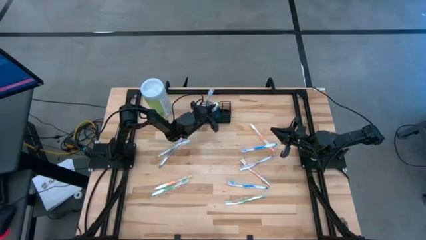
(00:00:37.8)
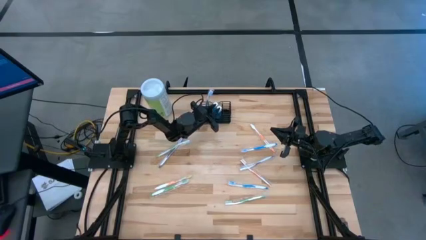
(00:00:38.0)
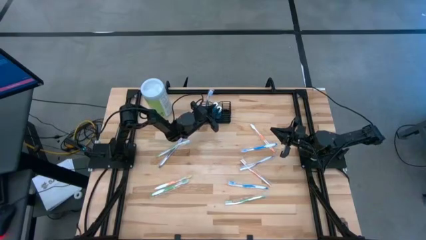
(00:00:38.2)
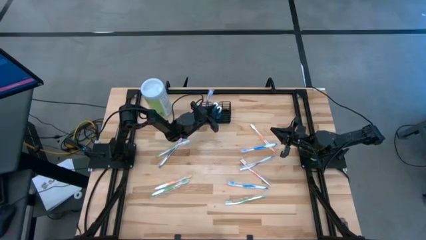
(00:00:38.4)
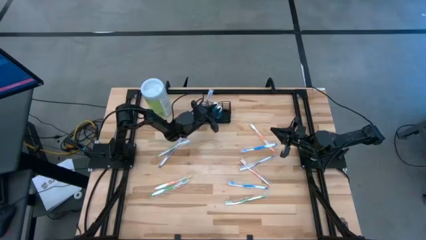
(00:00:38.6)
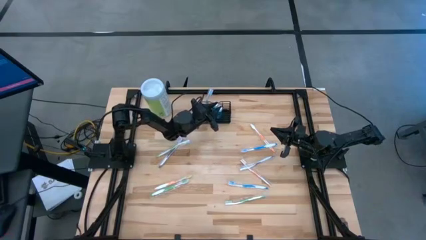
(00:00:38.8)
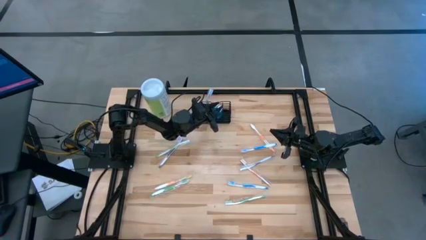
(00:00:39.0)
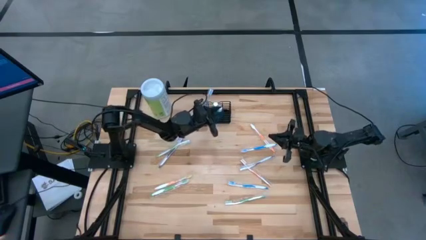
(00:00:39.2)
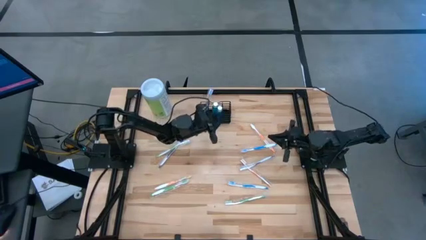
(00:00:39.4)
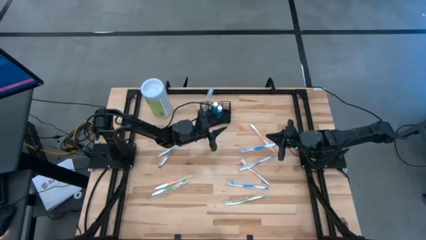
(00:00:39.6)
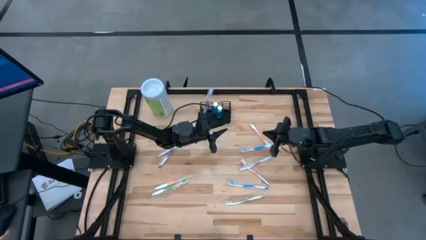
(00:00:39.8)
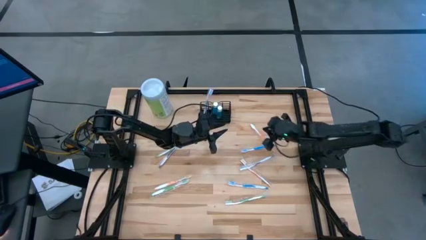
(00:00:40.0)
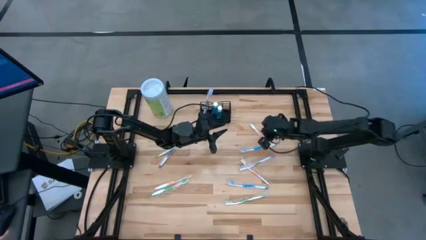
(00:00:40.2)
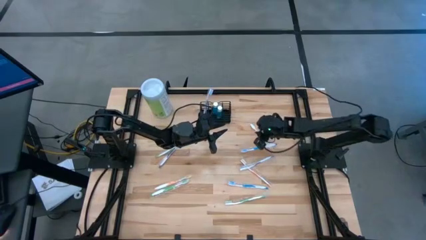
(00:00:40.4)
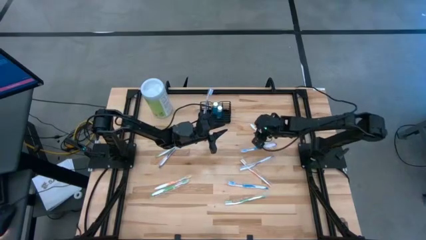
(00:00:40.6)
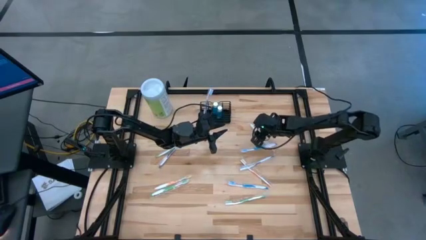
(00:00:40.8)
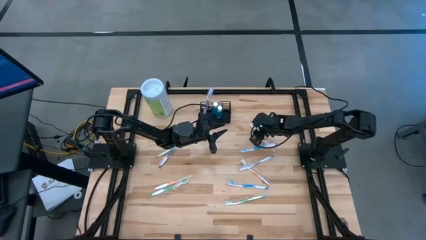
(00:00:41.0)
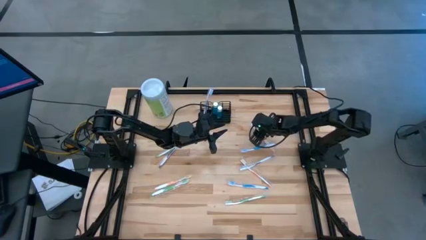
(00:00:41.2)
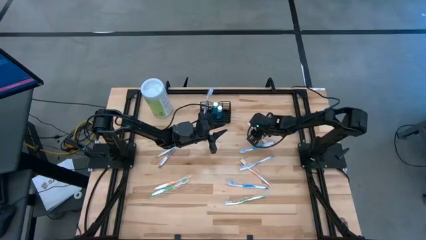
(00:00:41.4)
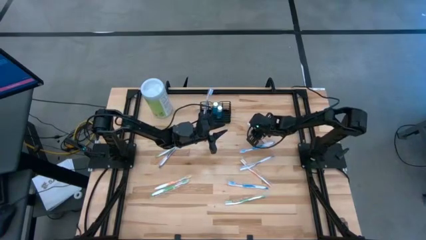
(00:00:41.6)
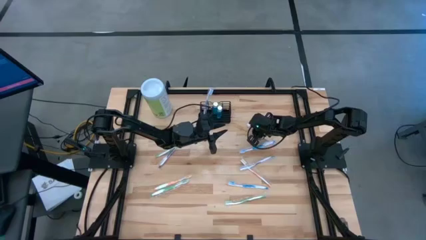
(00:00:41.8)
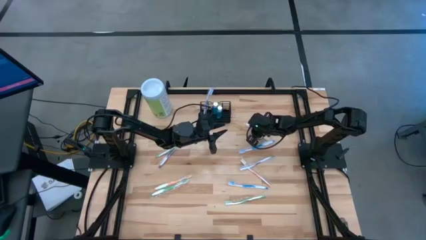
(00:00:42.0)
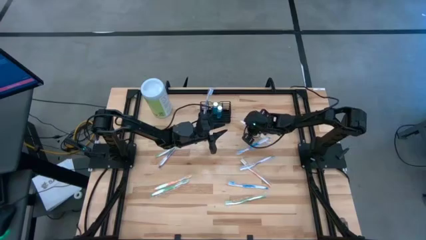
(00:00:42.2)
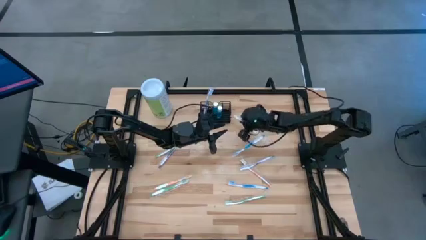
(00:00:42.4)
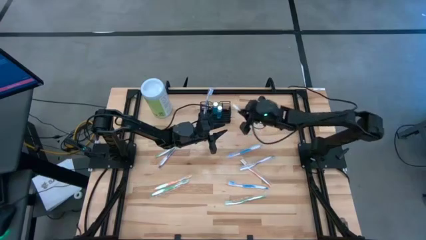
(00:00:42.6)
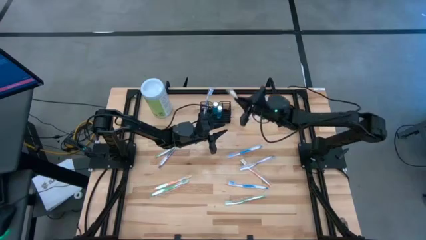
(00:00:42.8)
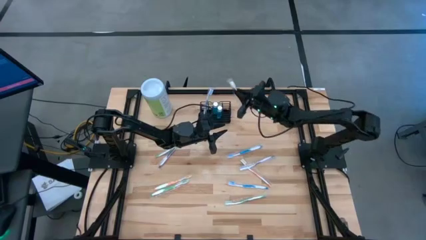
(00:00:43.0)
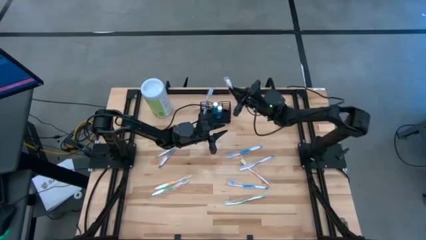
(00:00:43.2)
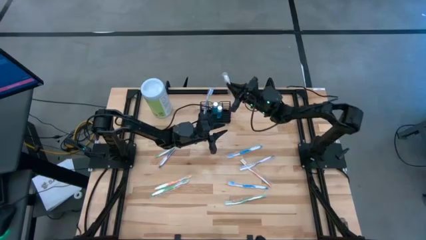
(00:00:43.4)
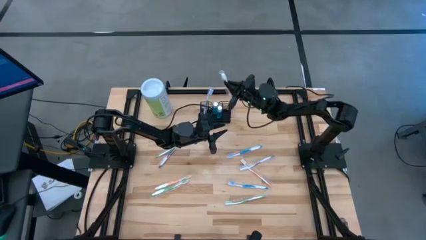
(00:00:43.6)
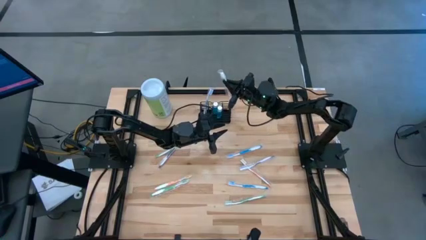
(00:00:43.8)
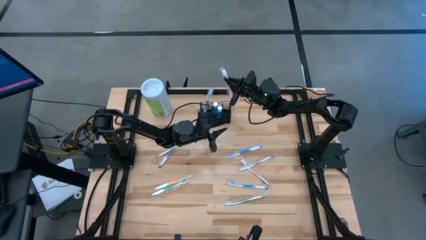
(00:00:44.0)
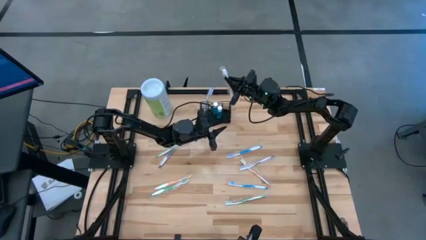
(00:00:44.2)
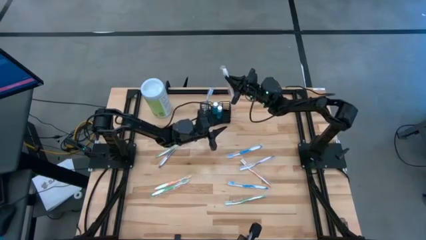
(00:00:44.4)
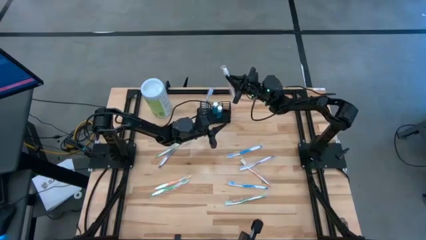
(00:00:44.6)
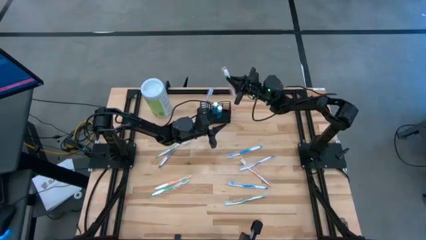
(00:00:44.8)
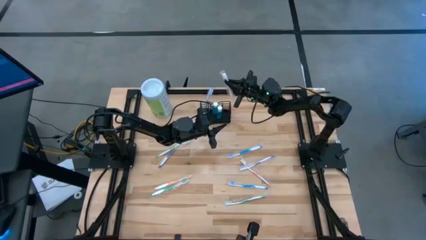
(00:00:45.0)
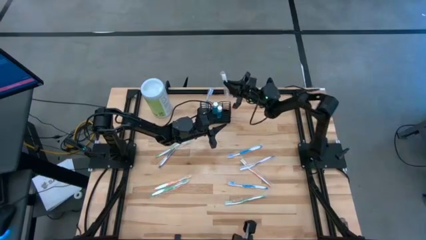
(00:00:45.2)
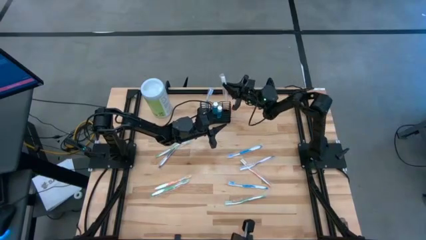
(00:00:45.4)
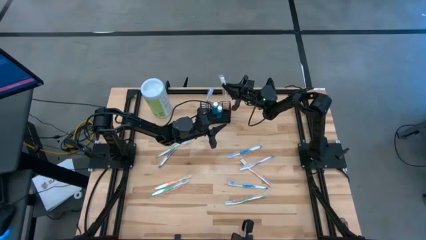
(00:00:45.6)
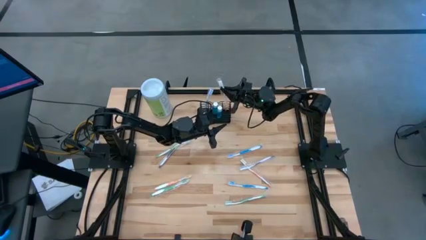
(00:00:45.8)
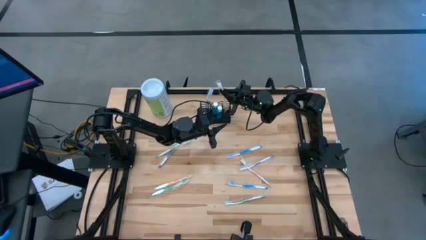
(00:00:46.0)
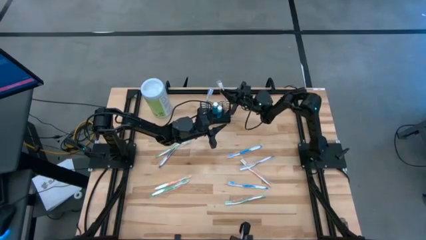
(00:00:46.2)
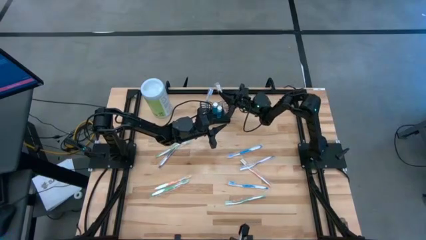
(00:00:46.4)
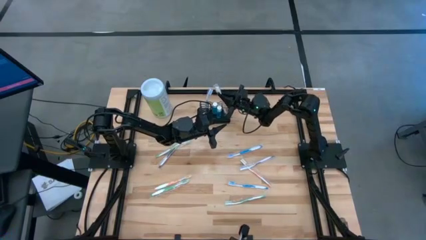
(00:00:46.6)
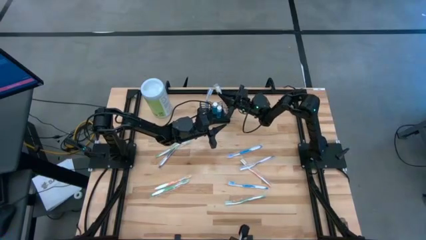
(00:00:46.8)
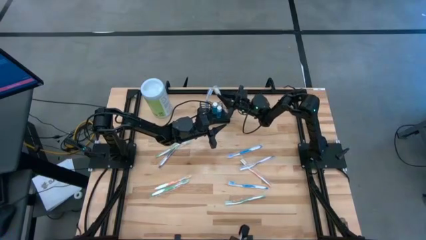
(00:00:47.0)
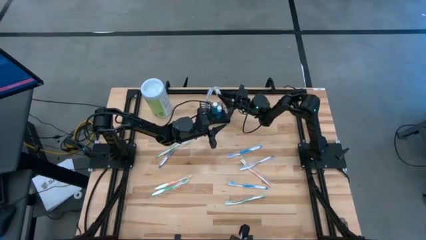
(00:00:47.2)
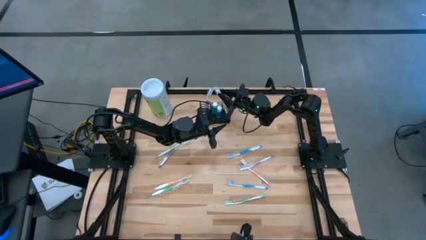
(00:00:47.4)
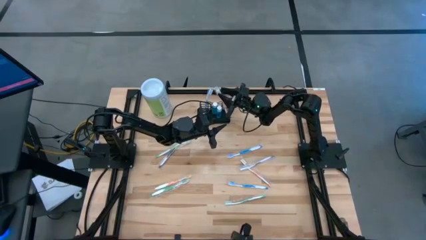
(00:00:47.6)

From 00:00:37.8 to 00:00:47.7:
Task: Pick & Place toothbrushing station
Put the orange toothbrush into the black wire organizer
